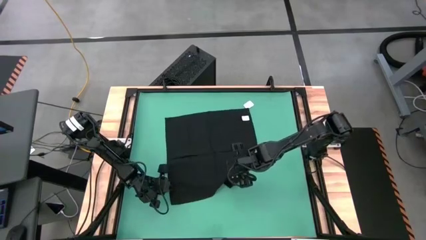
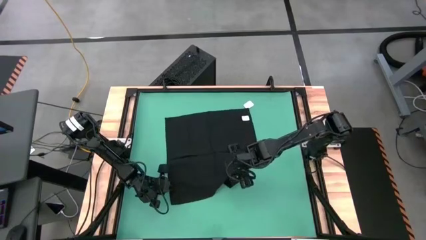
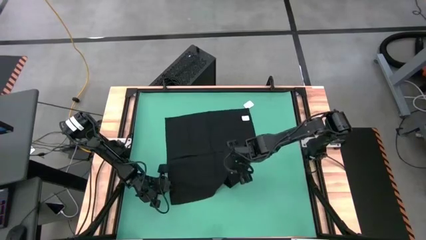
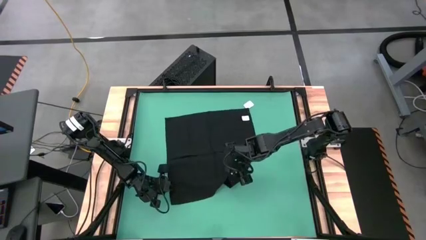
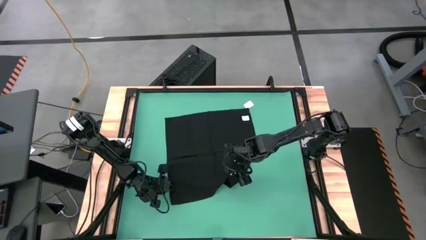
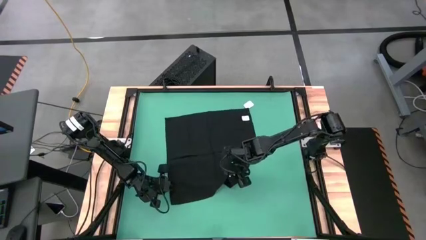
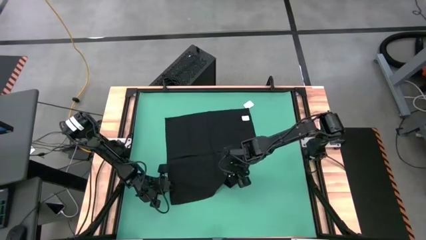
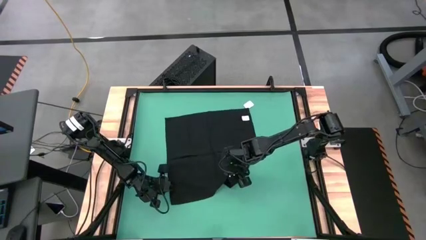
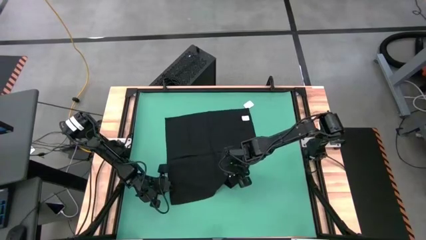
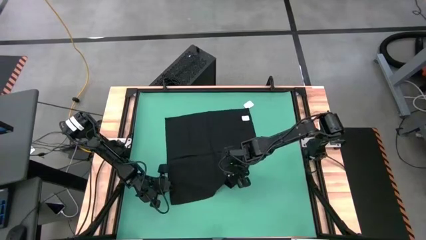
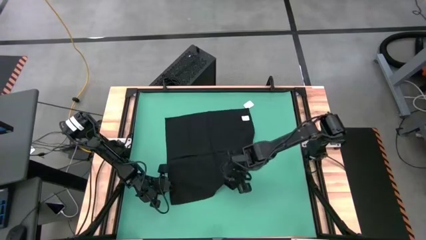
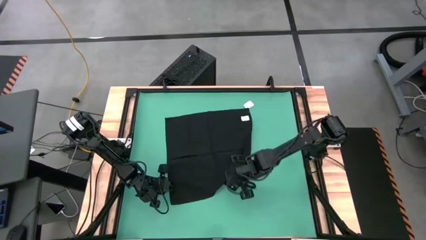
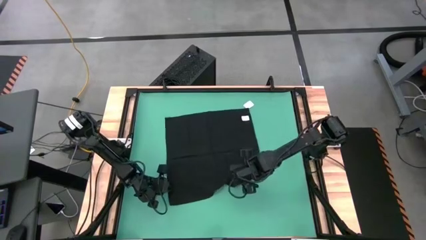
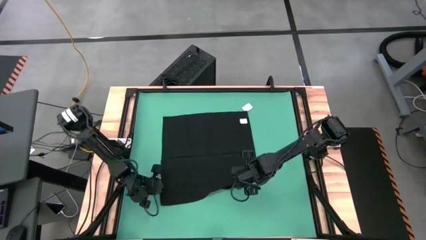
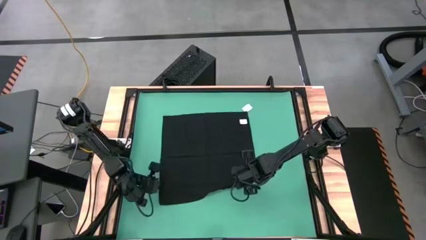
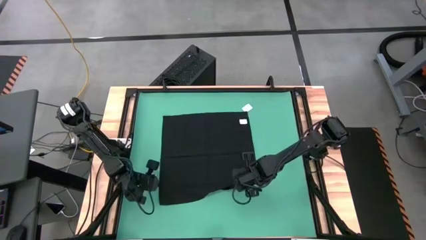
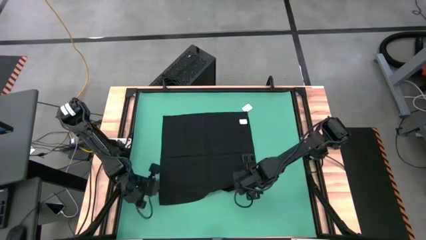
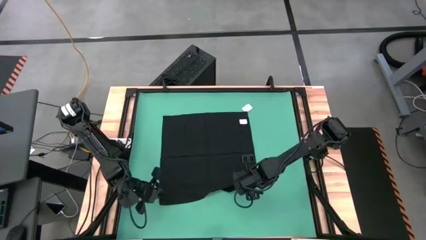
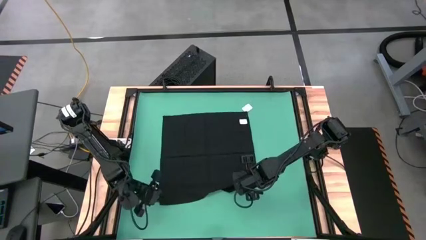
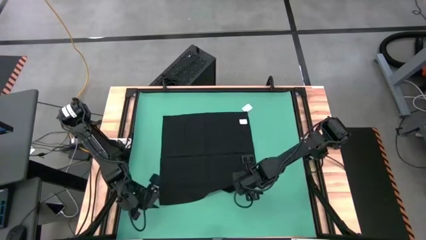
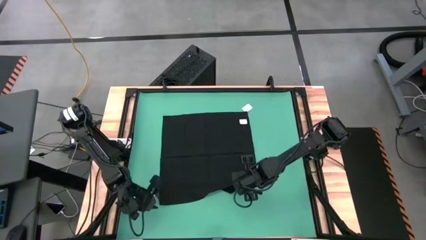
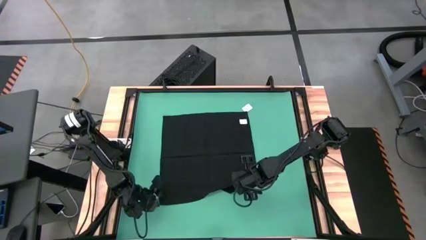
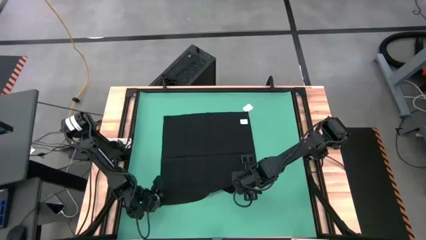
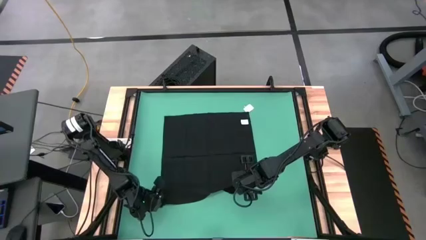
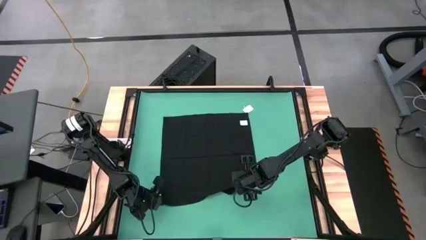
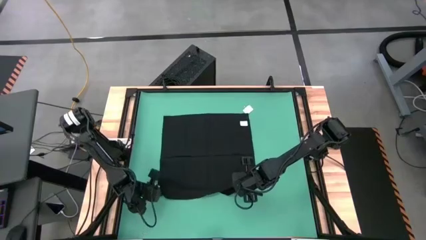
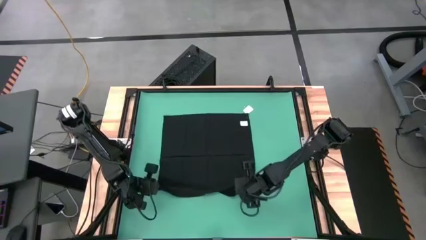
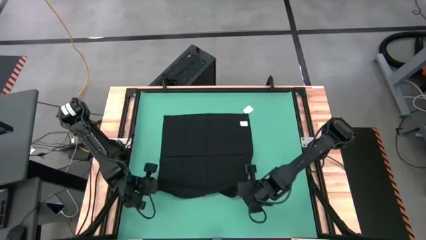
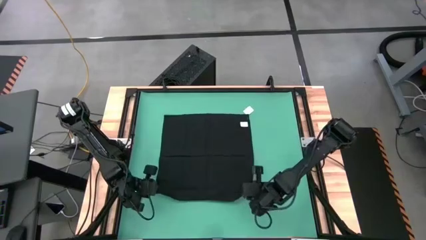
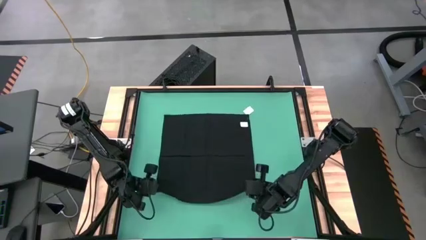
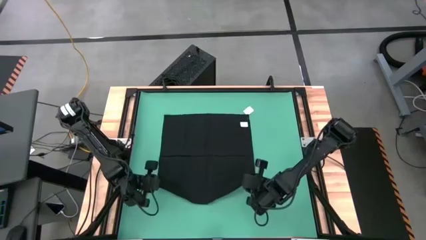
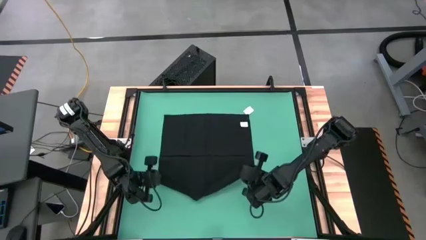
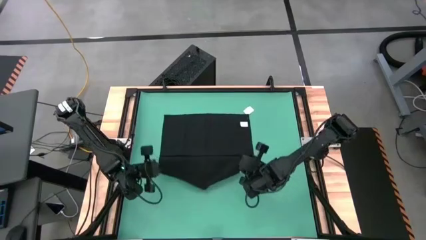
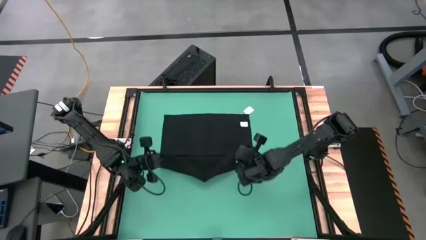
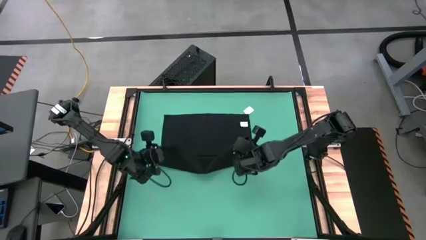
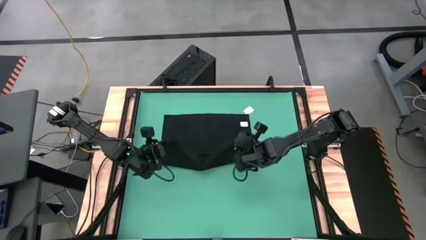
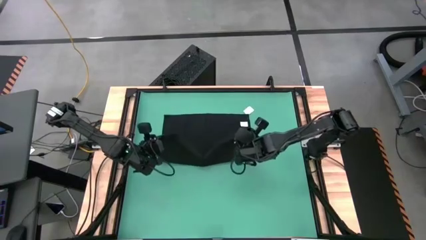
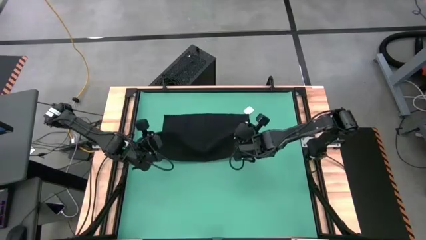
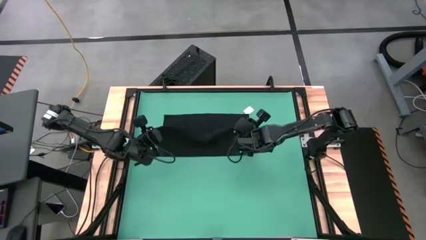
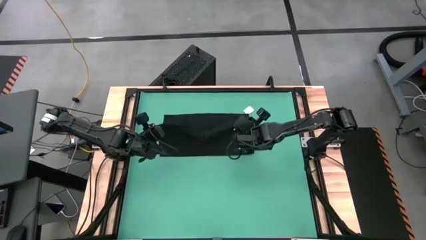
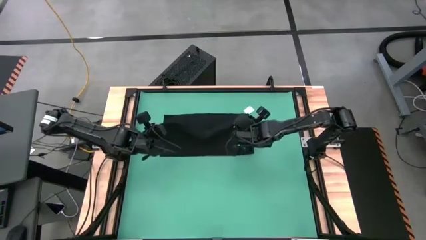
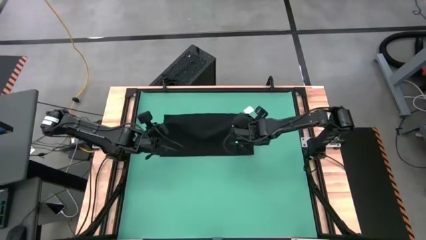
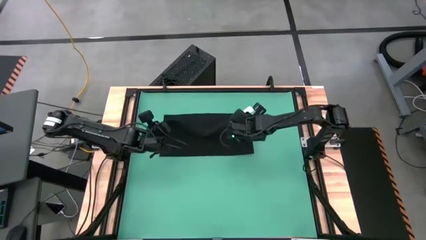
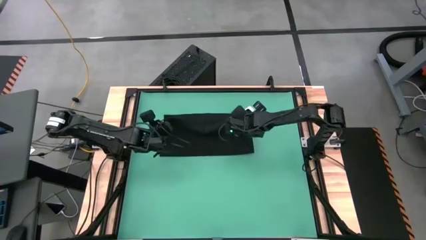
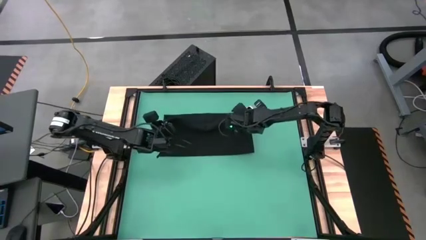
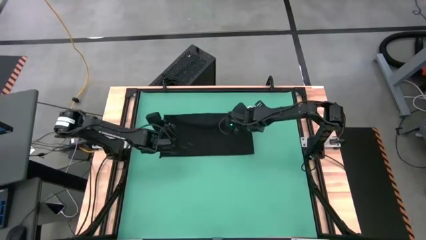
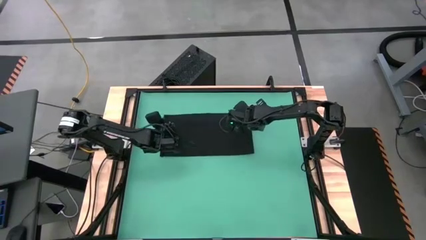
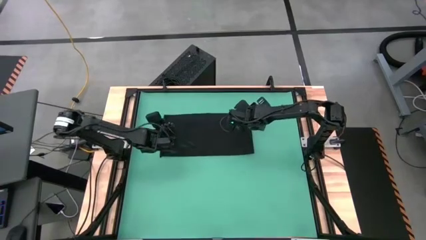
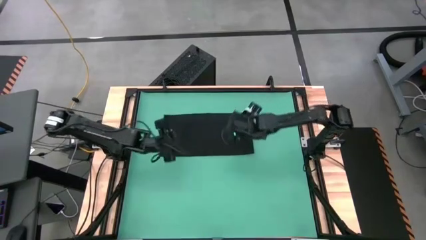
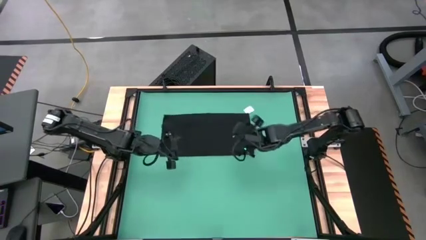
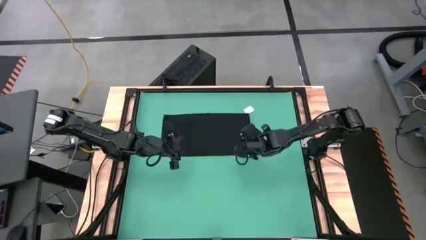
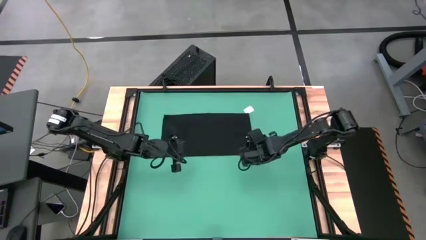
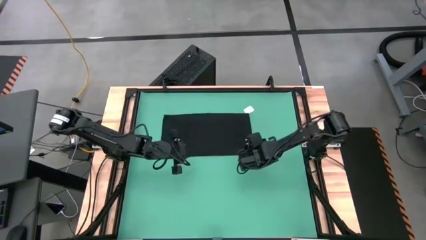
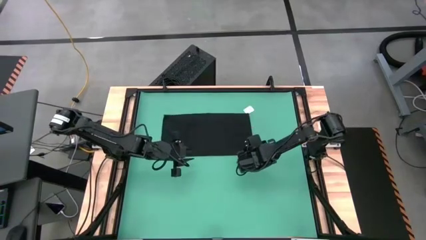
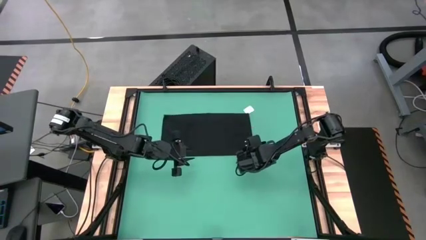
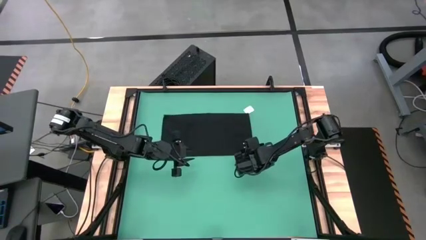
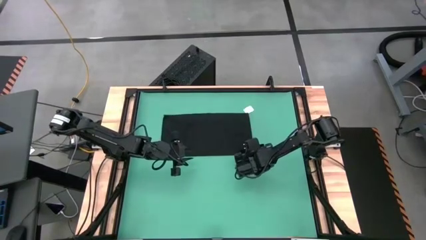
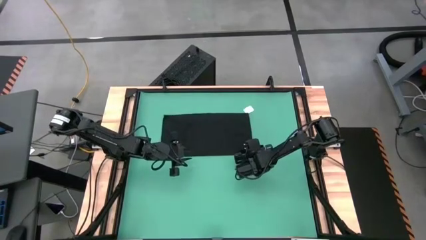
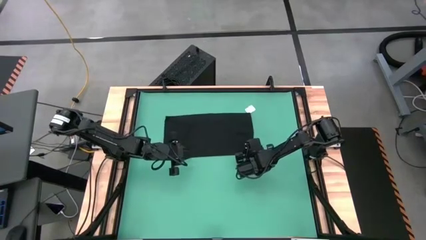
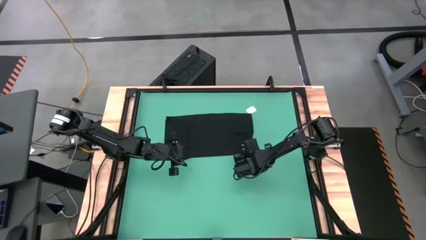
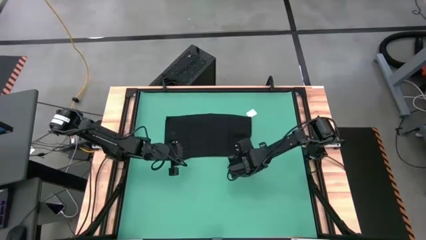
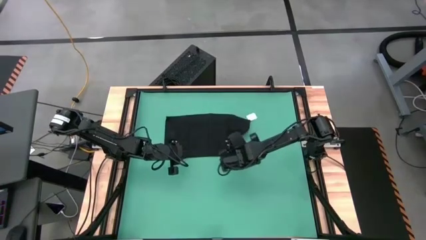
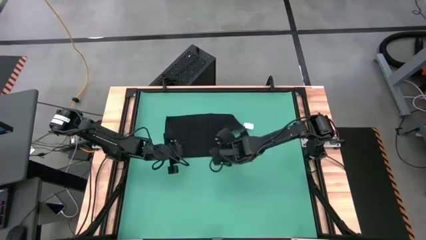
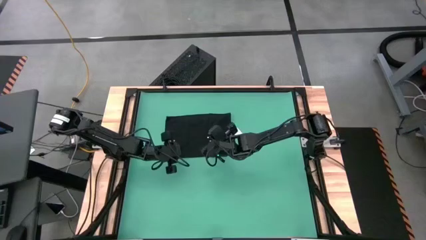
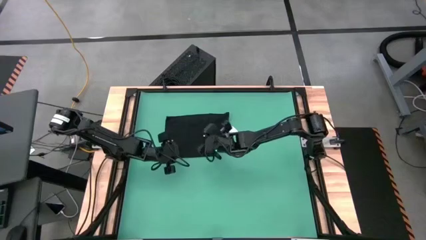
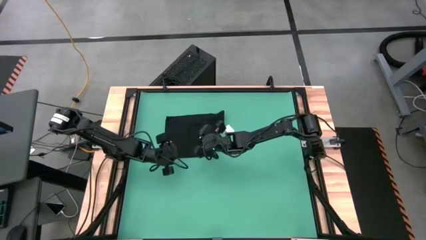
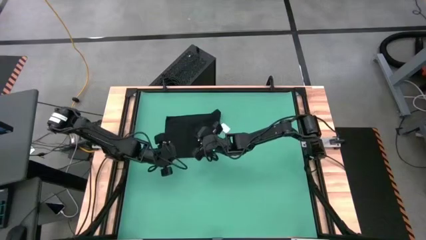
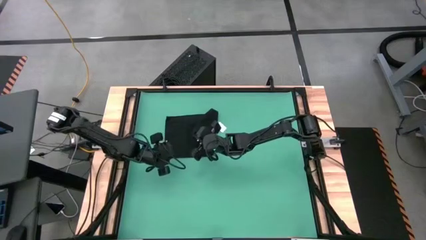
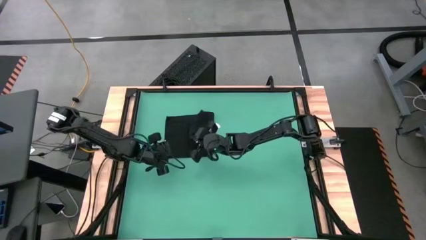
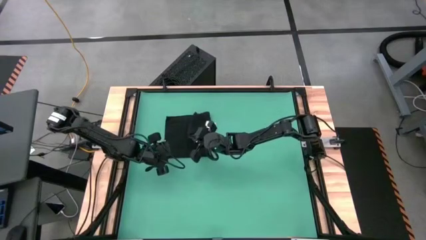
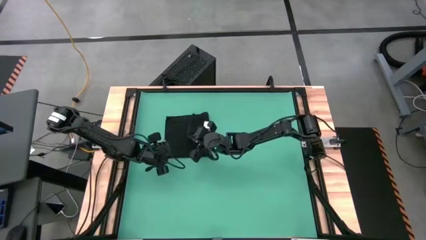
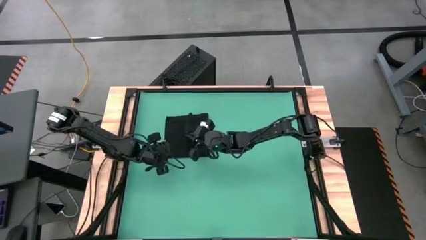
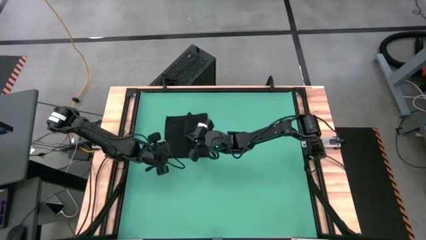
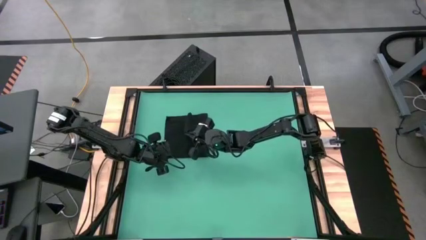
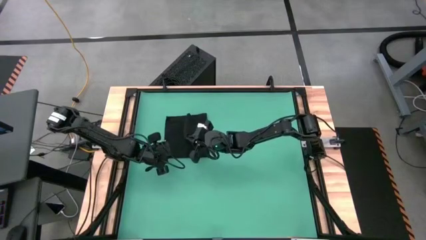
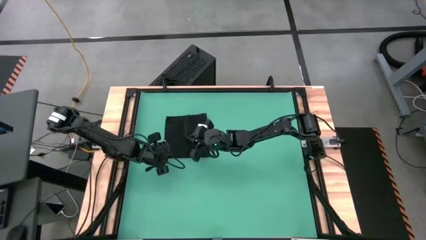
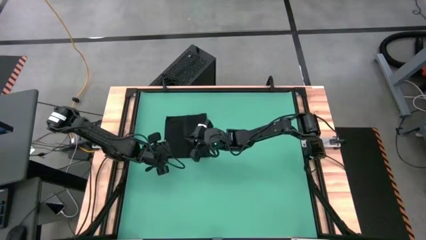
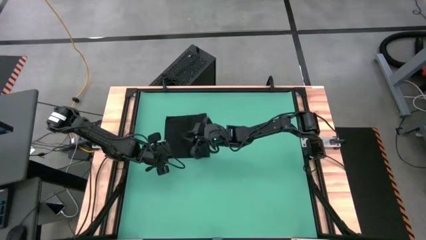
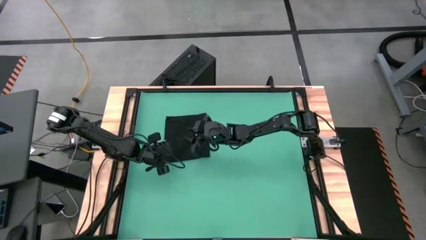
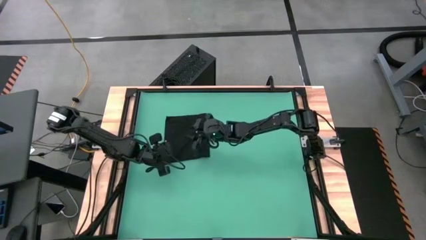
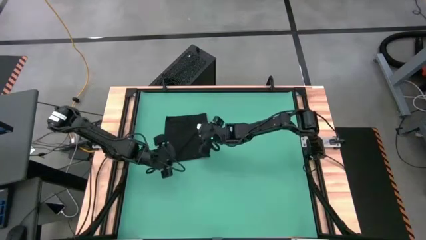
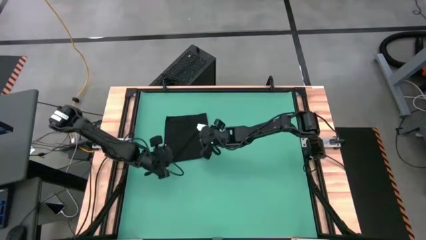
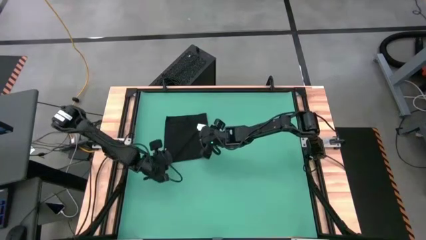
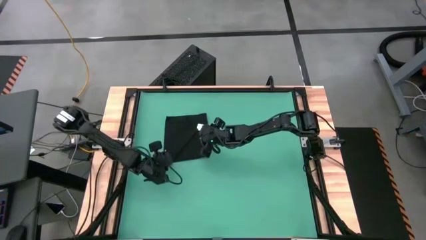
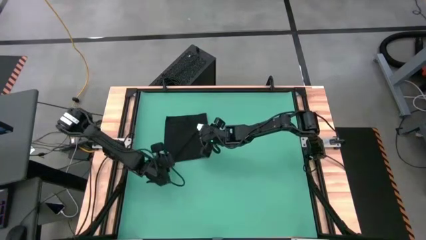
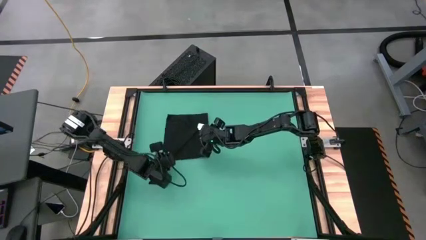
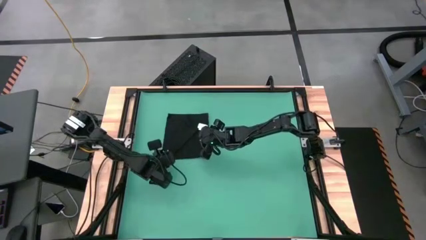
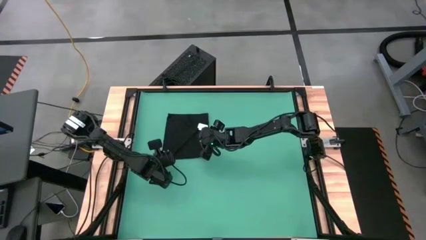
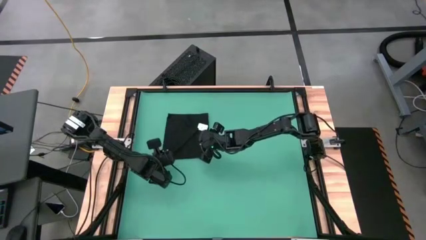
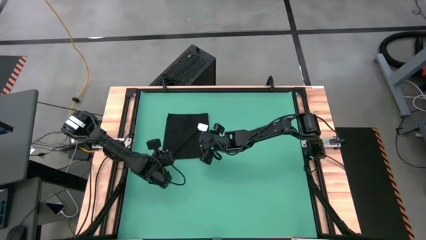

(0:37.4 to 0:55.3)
Task: Roll towel
Roll the black towel
